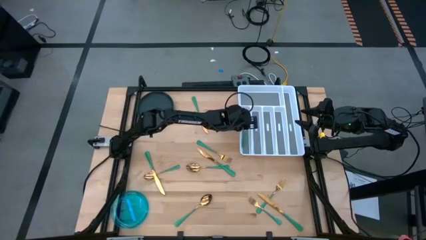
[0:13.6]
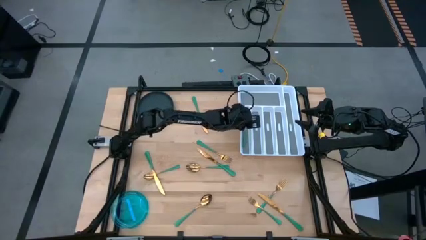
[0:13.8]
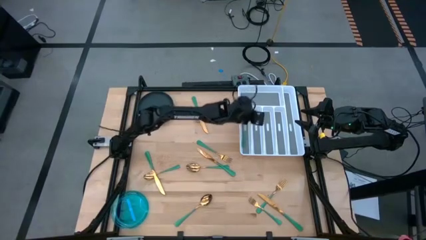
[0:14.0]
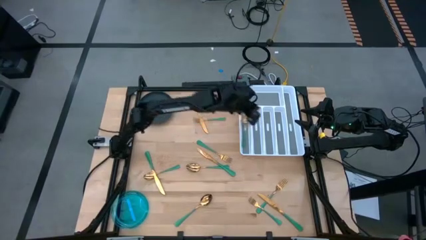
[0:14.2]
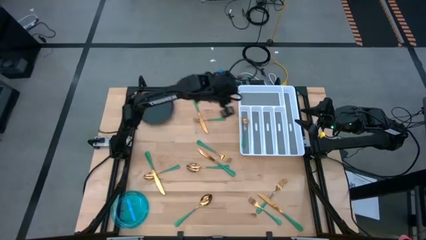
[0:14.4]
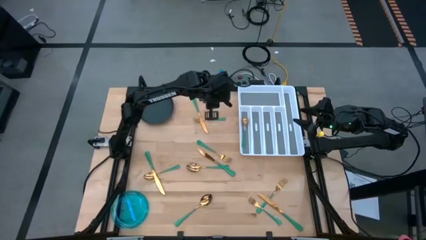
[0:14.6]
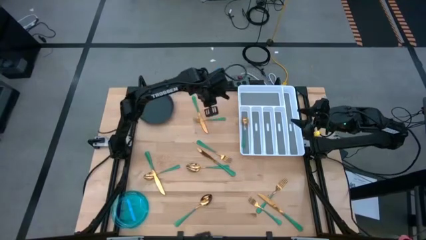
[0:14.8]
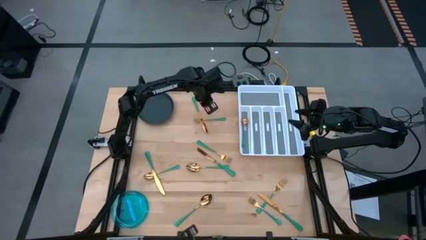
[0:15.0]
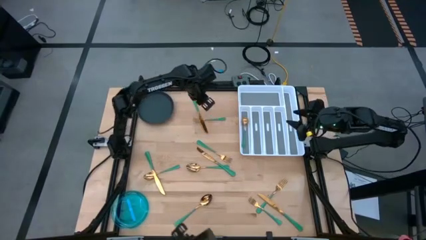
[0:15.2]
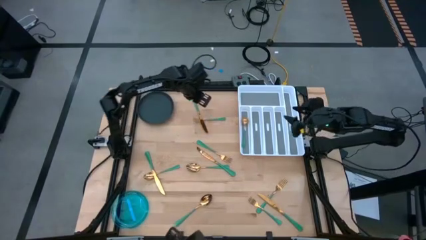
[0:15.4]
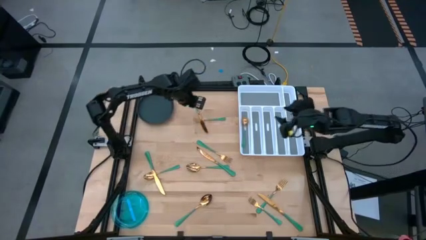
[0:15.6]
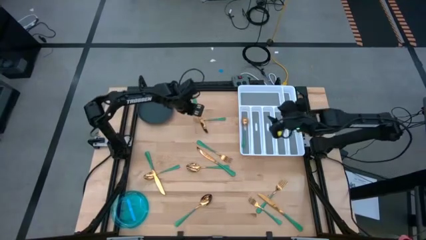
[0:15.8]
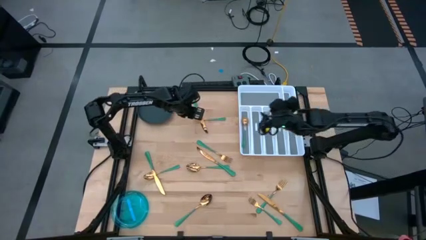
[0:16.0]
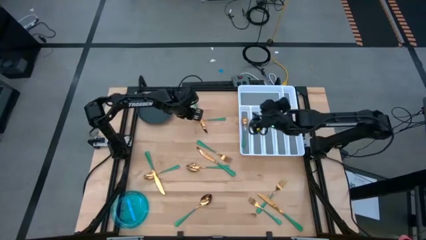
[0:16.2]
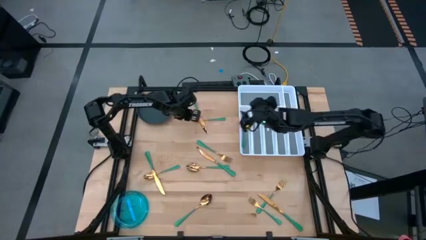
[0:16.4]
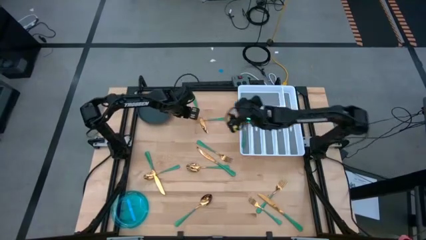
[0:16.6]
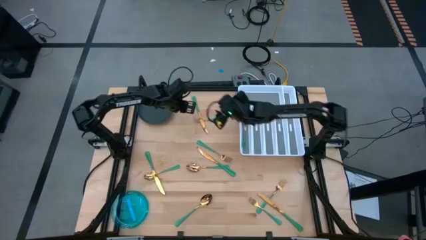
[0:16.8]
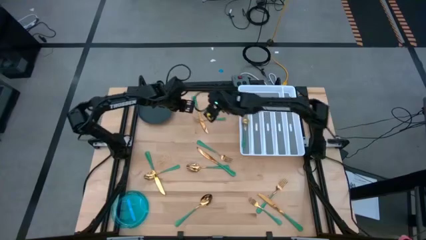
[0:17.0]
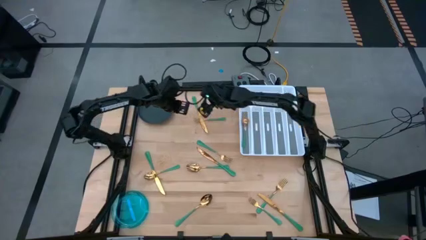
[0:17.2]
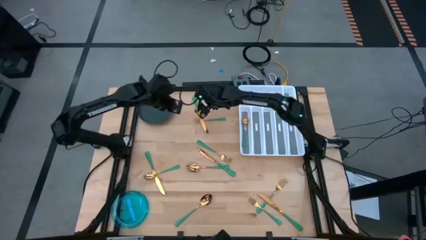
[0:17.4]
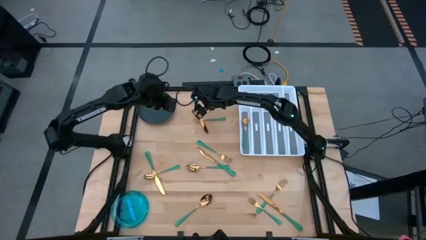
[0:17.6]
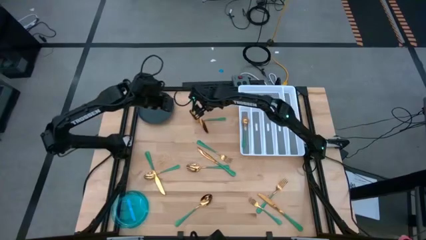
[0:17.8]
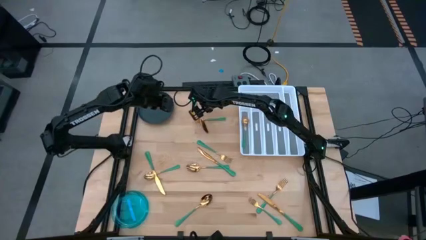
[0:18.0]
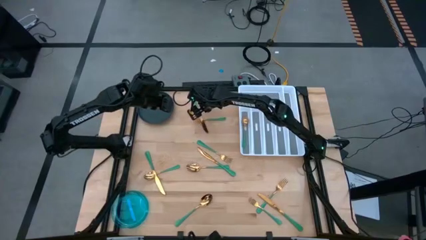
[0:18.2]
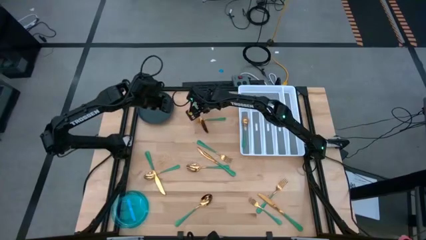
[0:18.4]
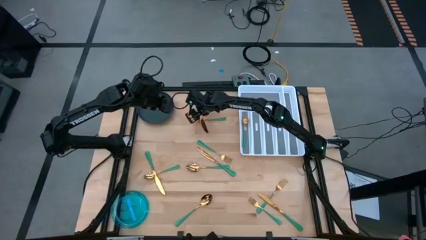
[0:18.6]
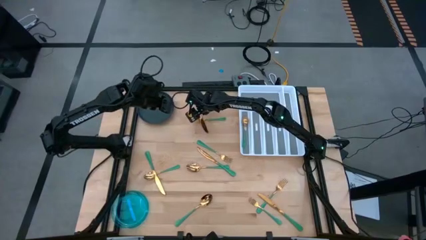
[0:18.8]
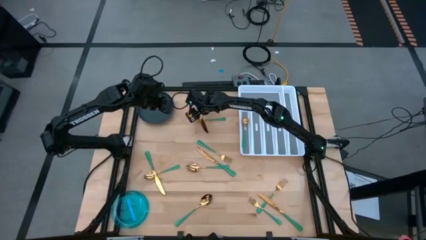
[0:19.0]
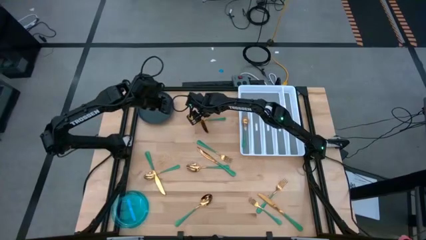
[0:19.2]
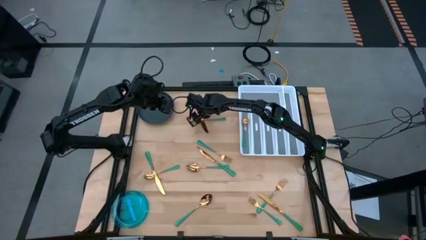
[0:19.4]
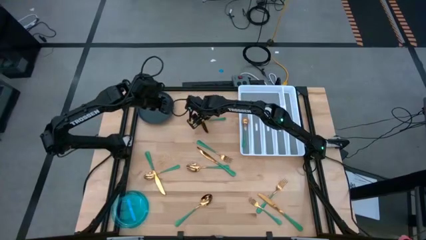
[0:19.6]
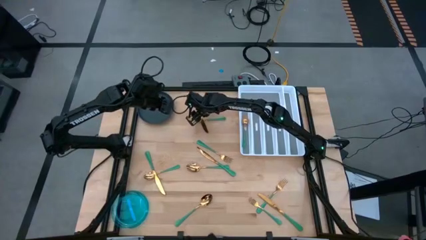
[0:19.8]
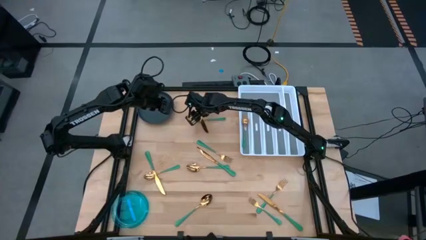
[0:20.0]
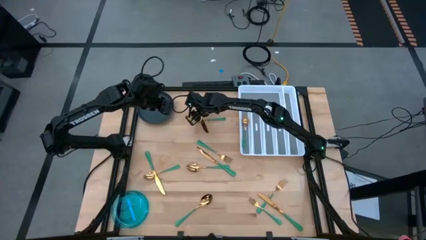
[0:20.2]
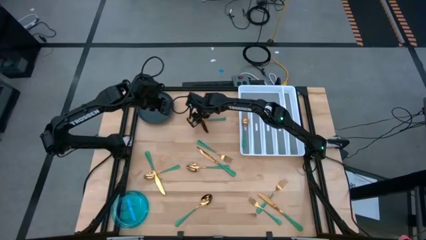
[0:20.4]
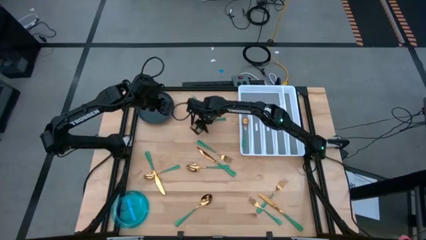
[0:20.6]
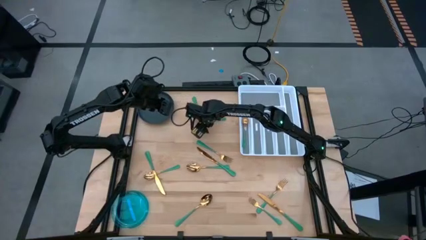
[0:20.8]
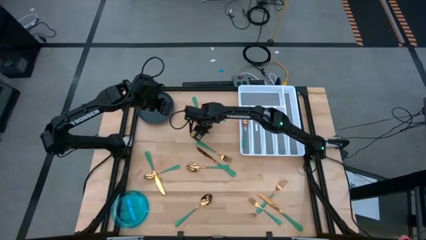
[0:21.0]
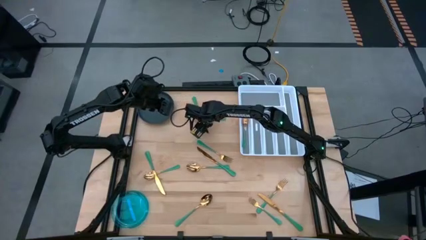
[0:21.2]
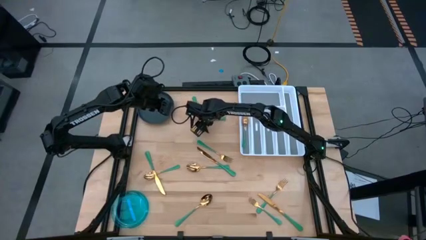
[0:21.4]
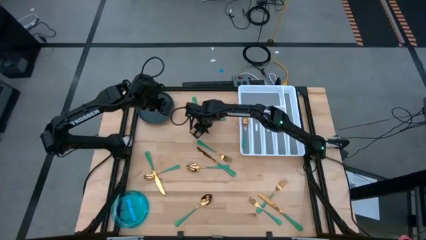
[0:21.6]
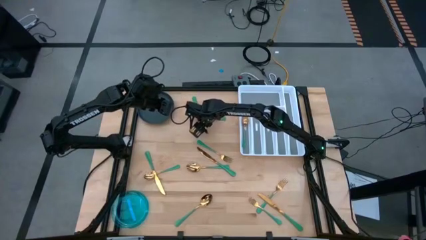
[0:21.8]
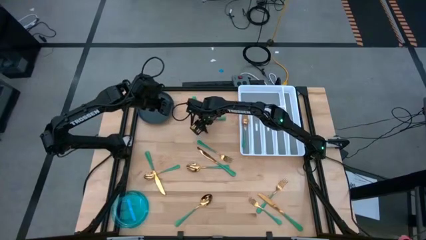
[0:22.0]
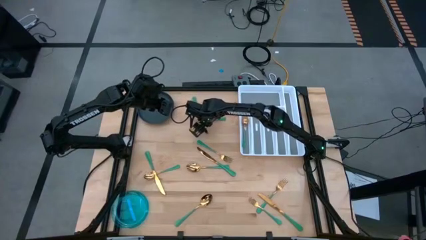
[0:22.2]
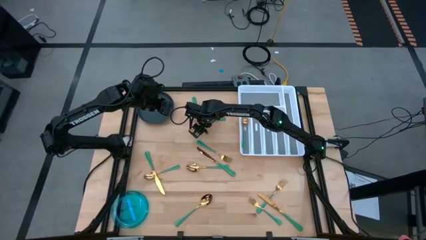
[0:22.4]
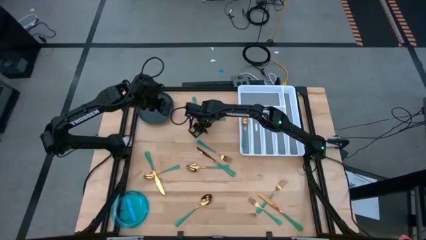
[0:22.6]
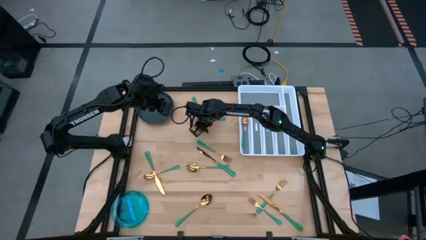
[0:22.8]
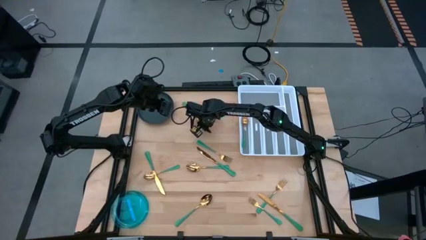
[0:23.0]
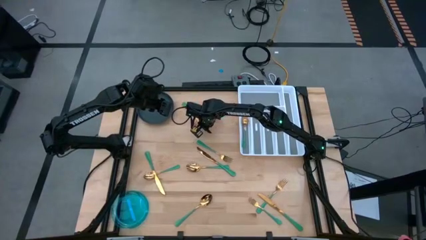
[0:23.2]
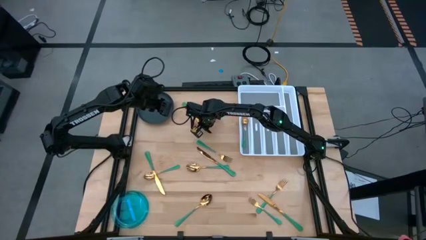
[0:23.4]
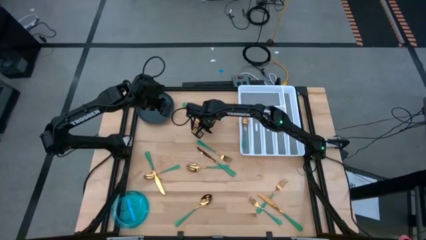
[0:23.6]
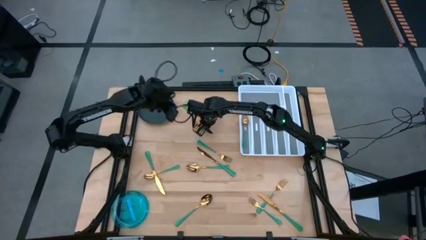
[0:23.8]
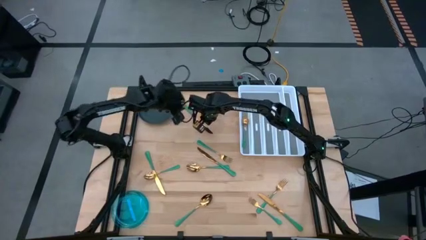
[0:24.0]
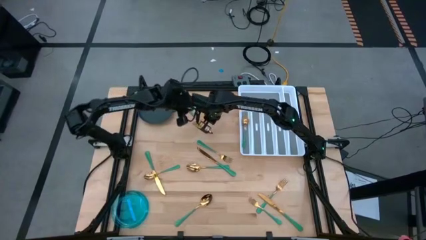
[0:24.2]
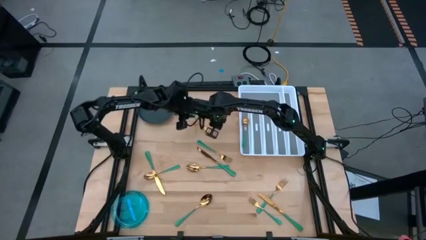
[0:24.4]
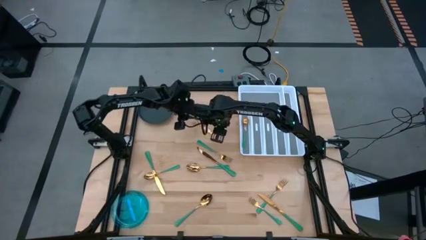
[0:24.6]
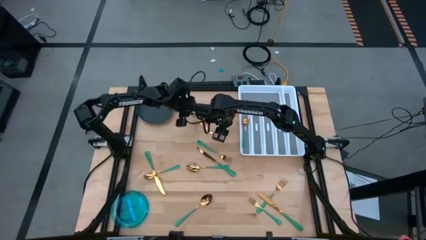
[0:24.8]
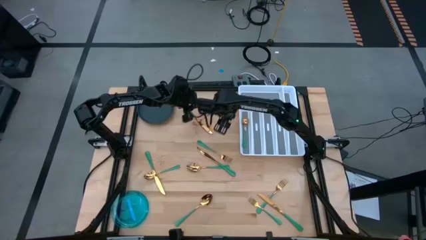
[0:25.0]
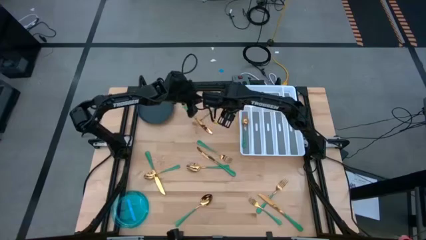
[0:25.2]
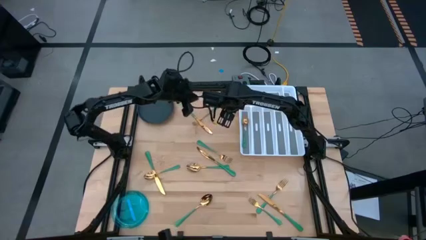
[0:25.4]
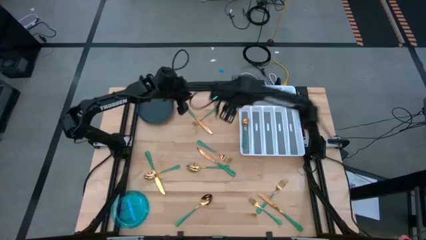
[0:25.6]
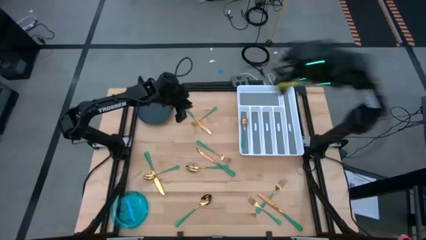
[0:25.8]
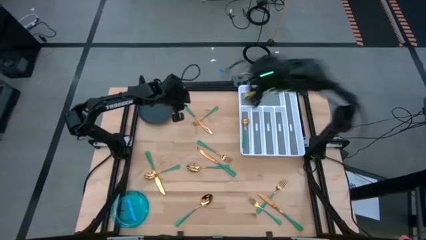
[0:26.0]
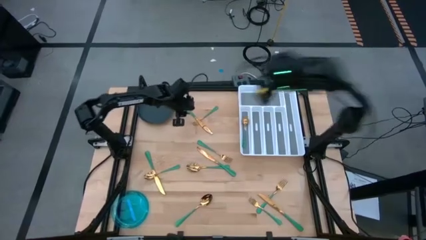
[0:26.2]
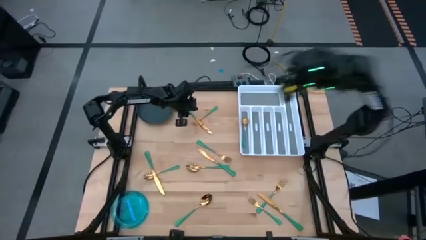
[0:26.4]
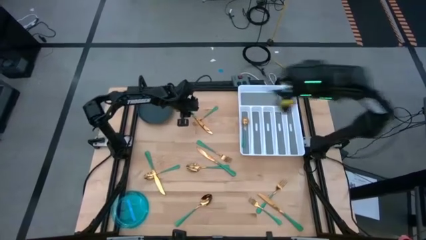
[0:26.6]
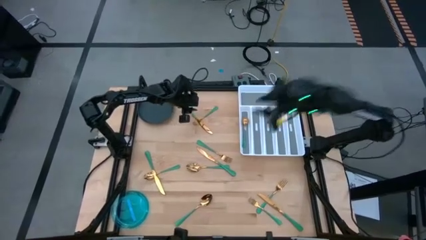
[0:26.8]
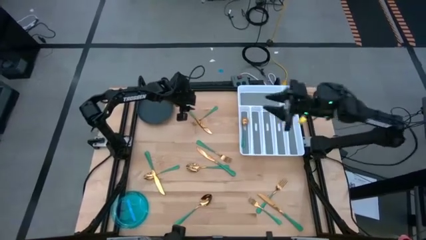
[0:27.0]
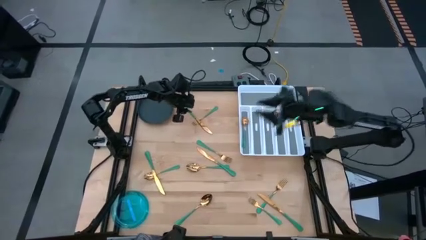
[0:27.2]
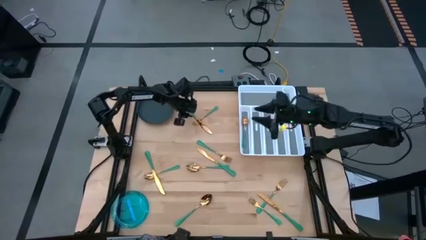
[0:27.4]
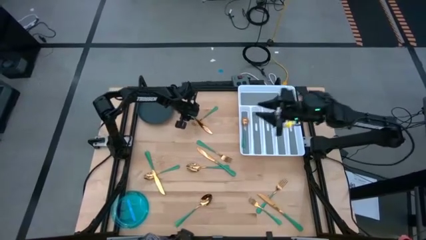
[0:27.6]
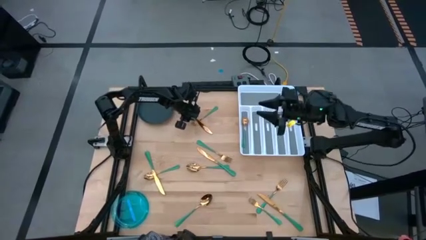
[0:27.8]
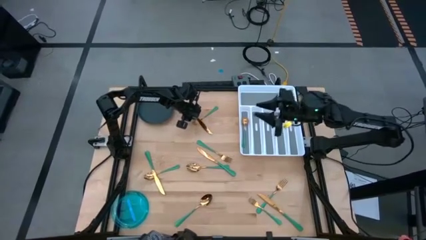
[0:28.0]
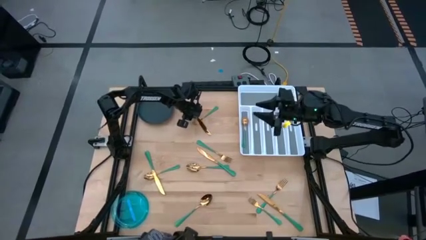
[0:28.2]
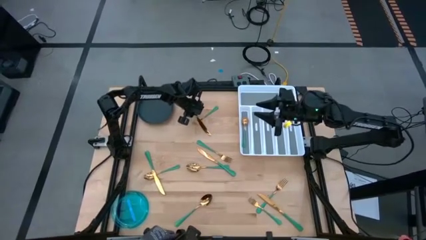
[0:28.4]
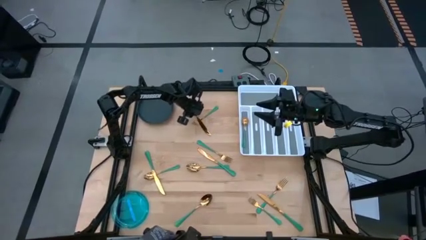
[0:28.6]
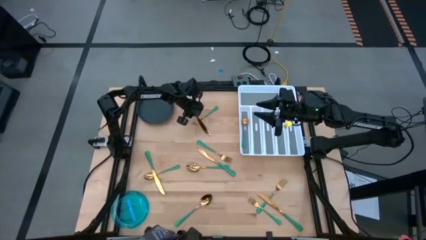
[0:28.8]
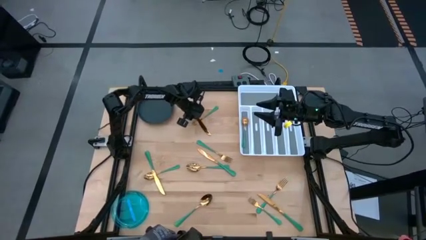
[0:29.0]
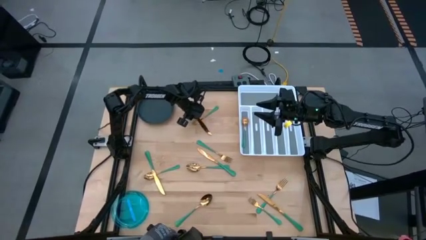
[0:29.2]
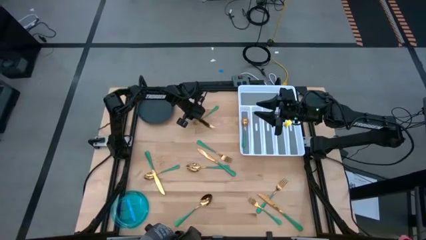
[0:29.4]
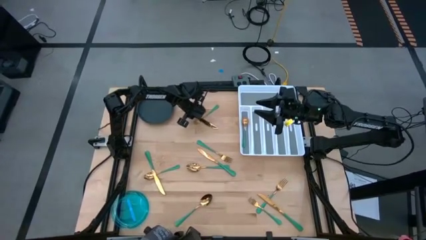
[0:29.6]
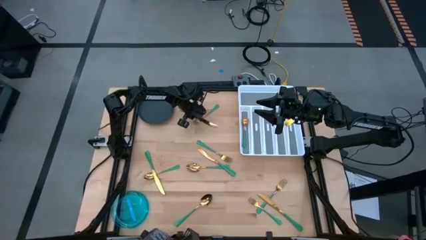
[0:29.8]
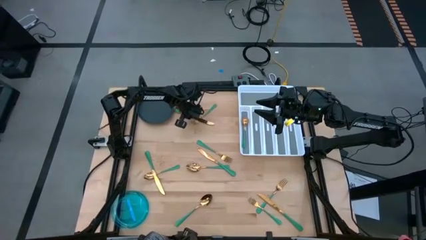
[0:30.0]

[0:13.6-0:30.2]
Task: Sort silverware
Put the green knife into the silverware tray
